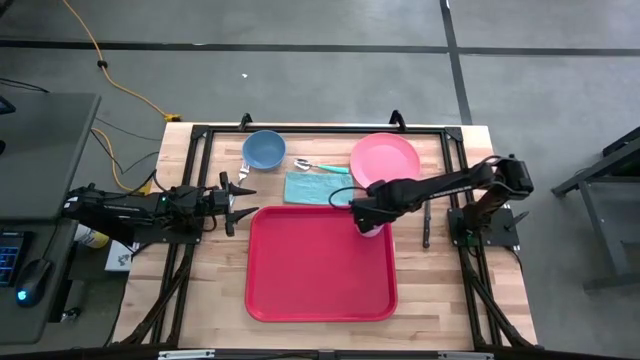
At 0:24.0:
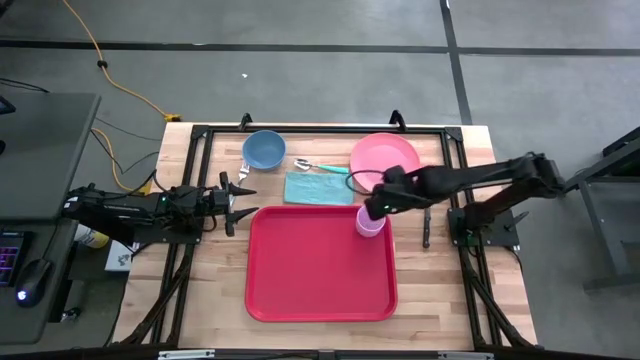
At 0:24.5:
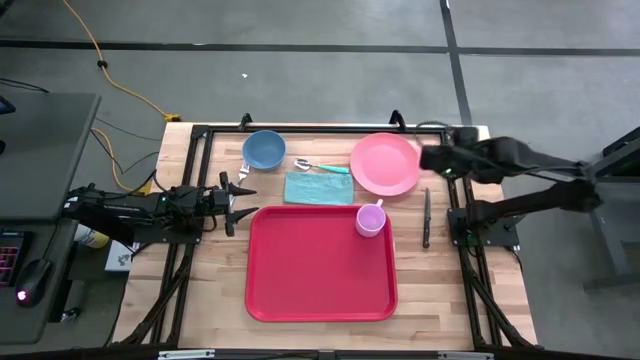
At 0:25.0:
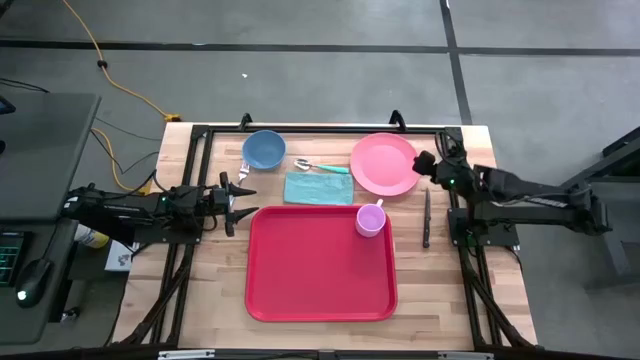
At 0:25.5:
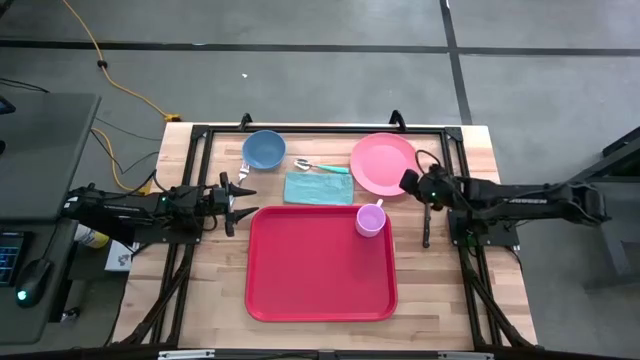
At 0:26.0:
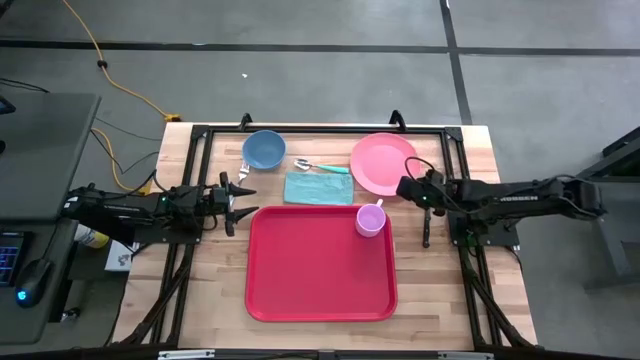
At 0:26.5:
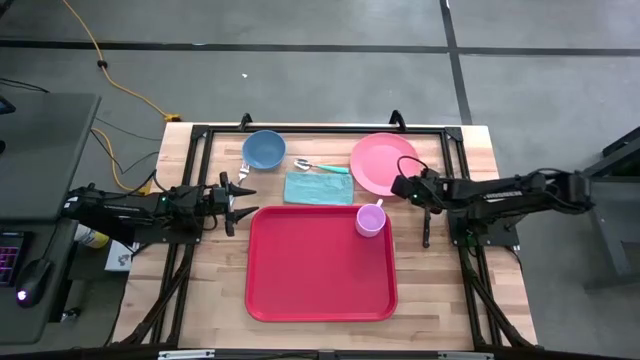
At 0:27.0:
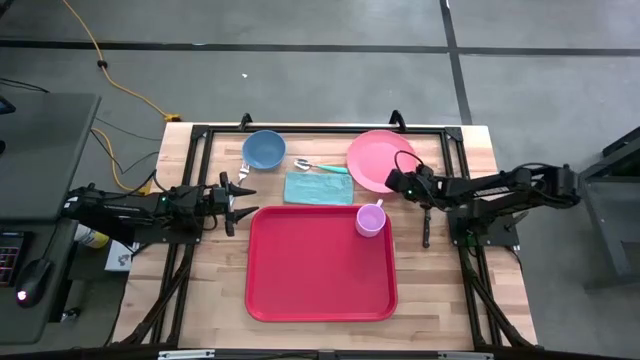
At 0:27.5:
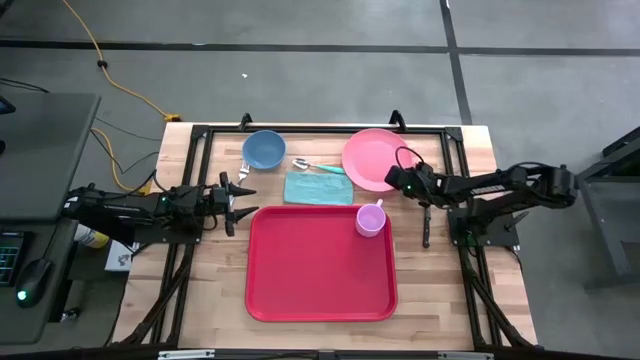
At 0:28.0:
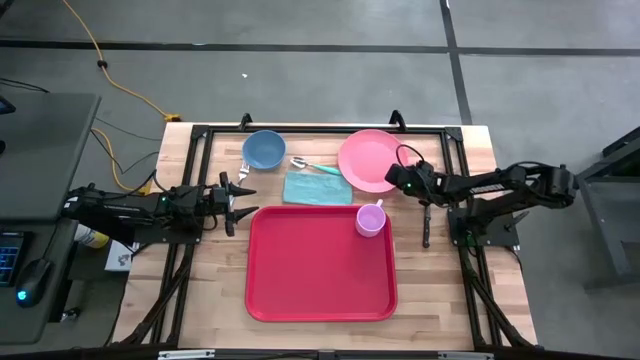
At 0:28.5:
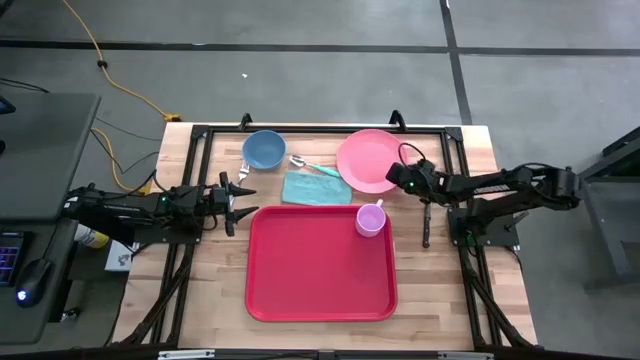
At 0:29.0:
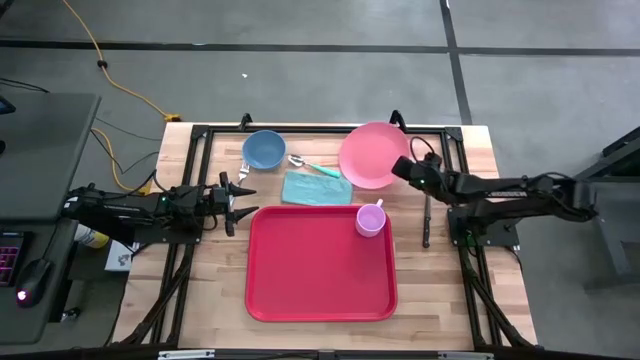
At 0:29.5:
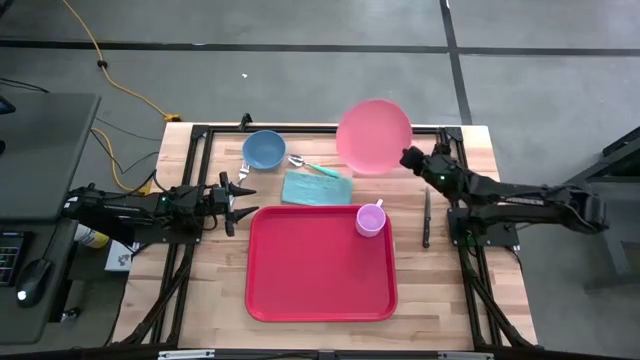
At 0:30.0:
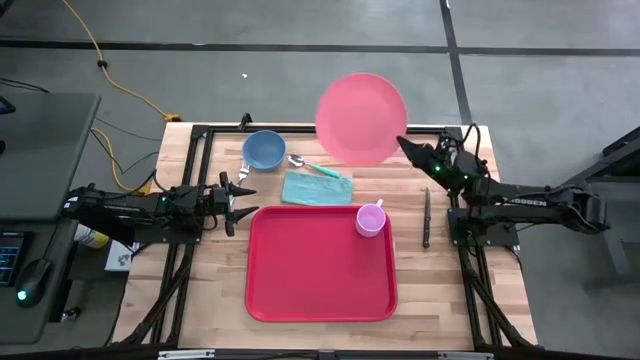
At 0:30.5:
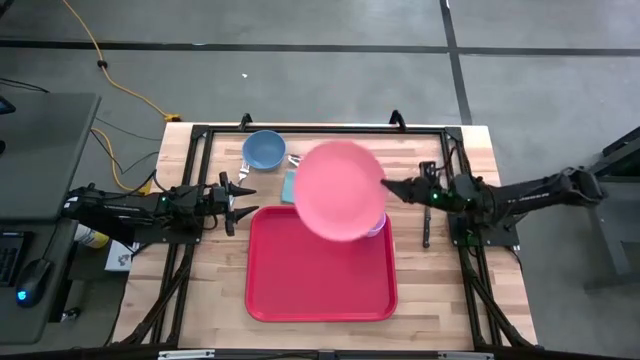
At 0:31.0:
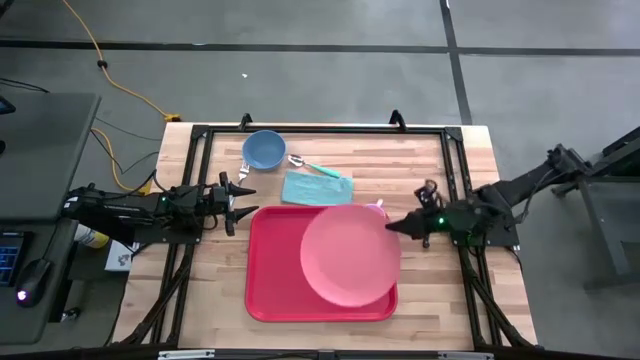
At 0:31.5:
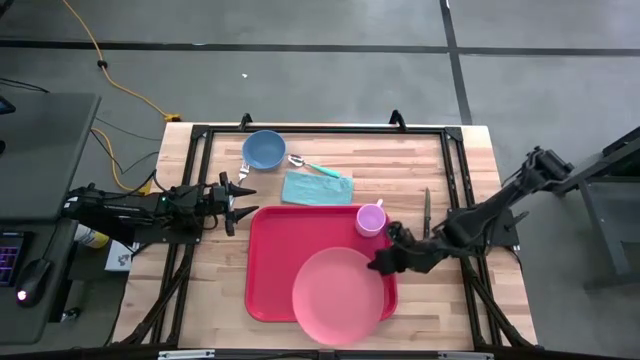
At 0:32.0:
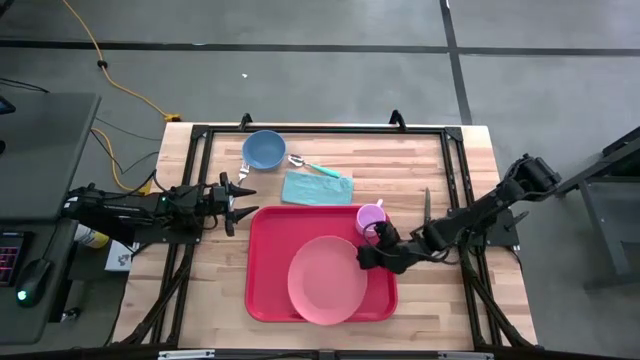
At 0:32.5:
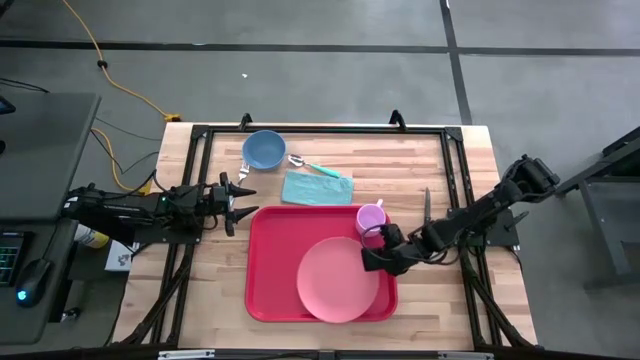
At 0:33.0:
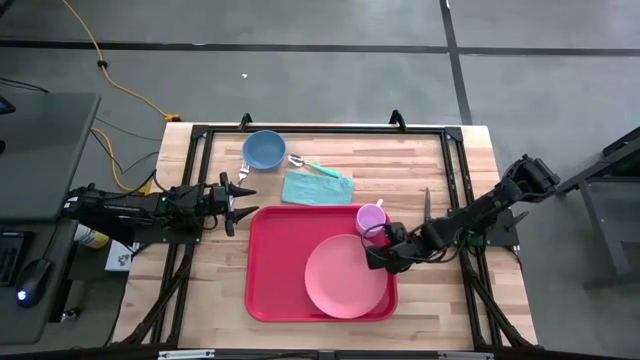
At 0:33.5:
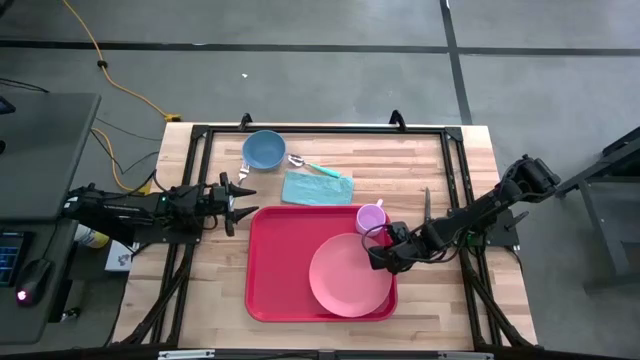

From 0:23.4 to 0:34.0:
Task: Set up tray
Put the pink plate on the red serving tray at the bottom of the pink mug

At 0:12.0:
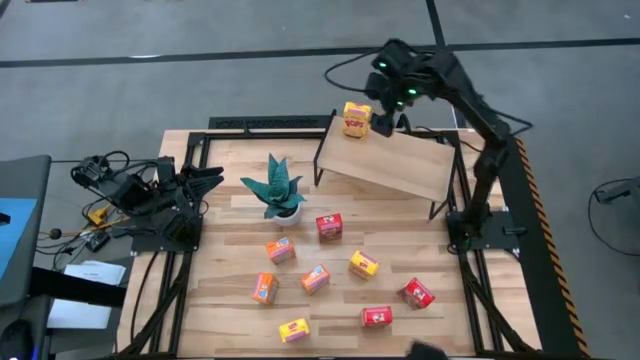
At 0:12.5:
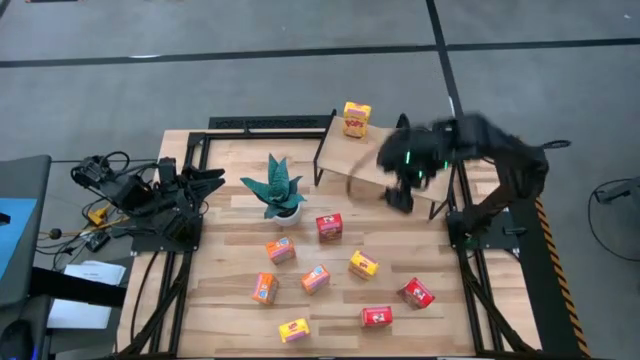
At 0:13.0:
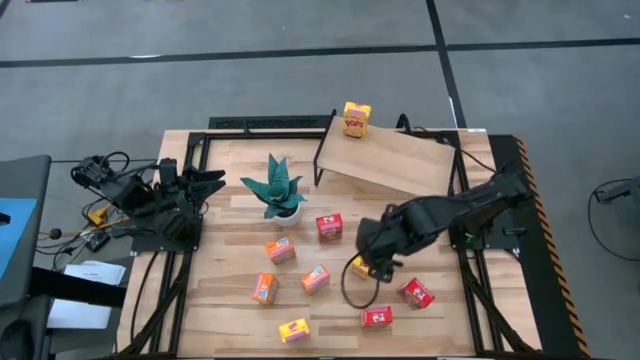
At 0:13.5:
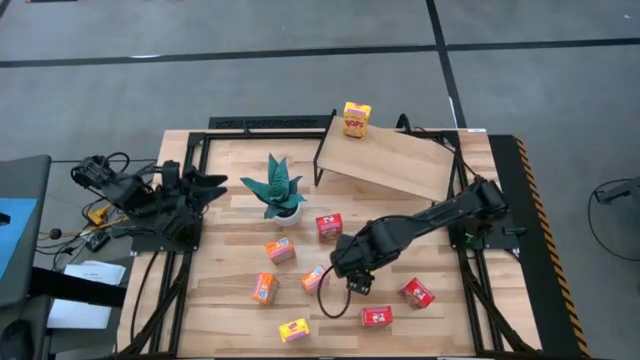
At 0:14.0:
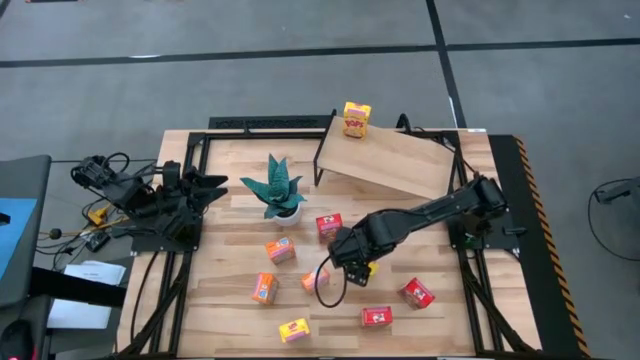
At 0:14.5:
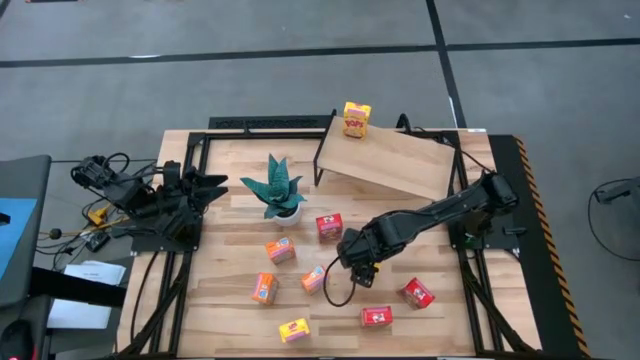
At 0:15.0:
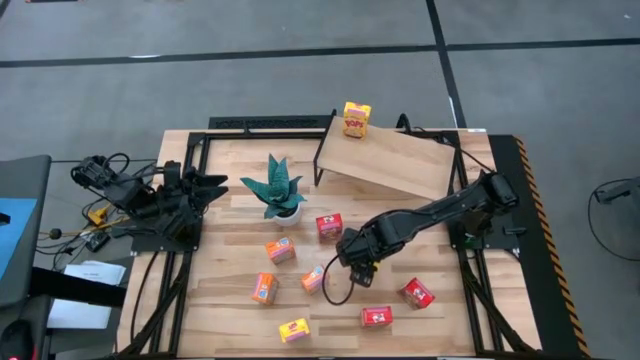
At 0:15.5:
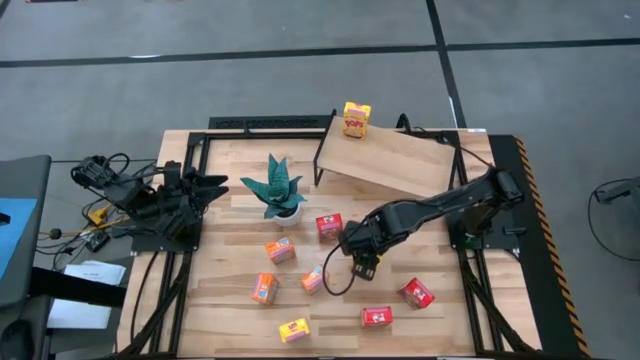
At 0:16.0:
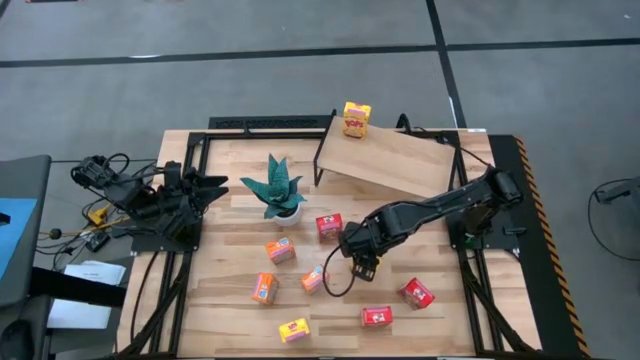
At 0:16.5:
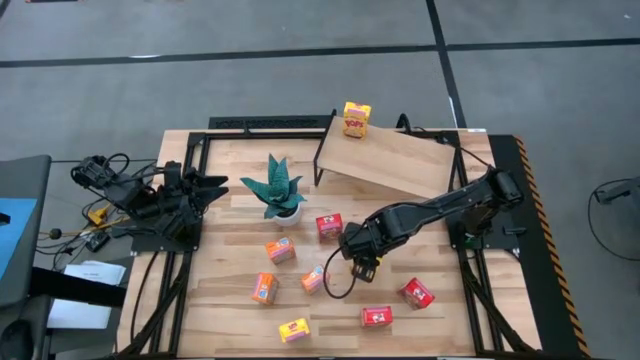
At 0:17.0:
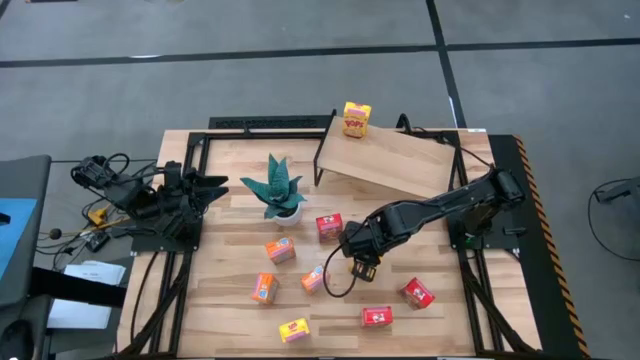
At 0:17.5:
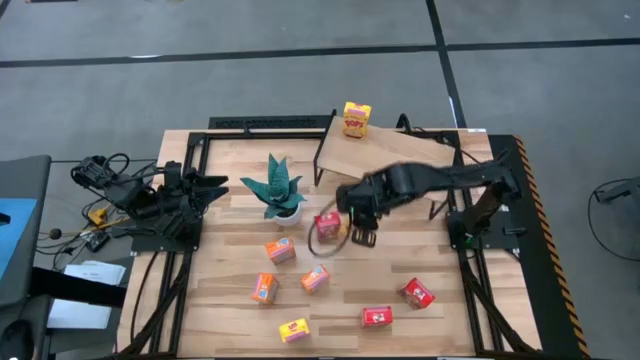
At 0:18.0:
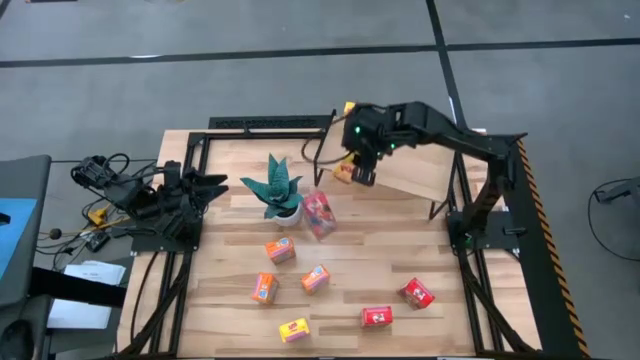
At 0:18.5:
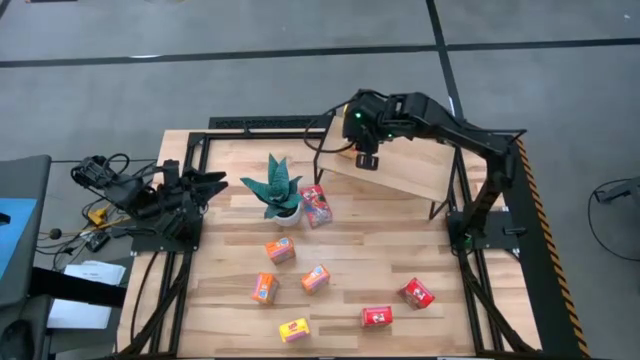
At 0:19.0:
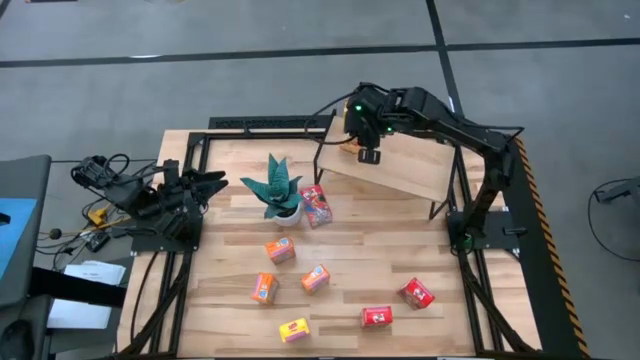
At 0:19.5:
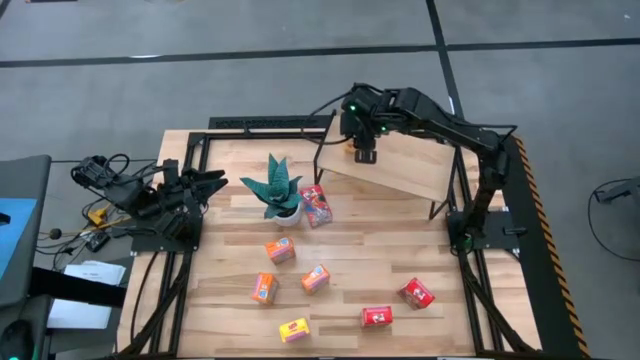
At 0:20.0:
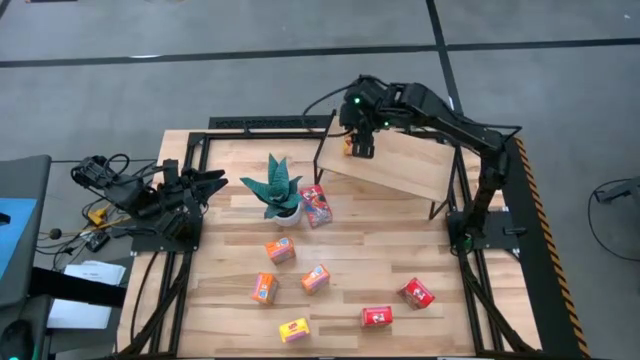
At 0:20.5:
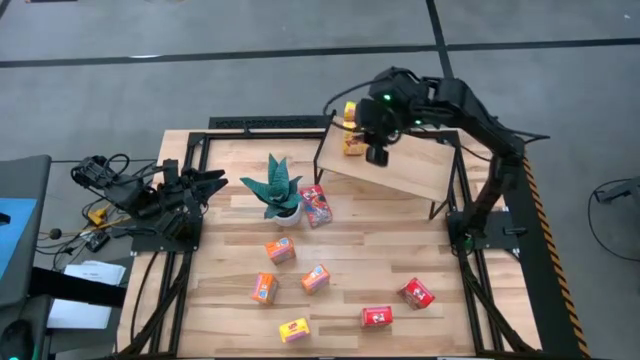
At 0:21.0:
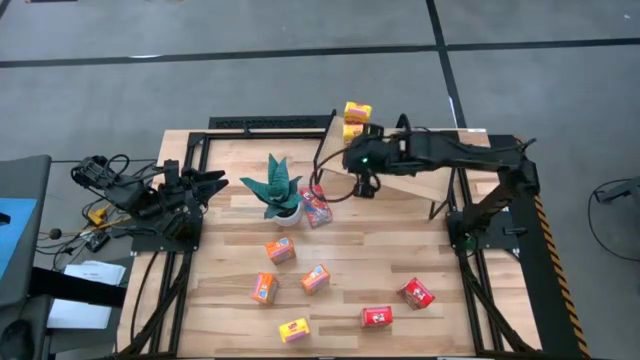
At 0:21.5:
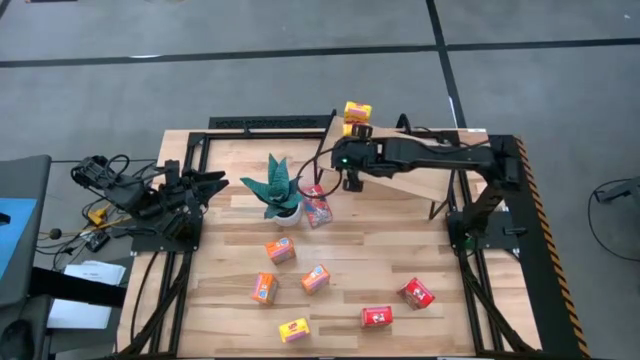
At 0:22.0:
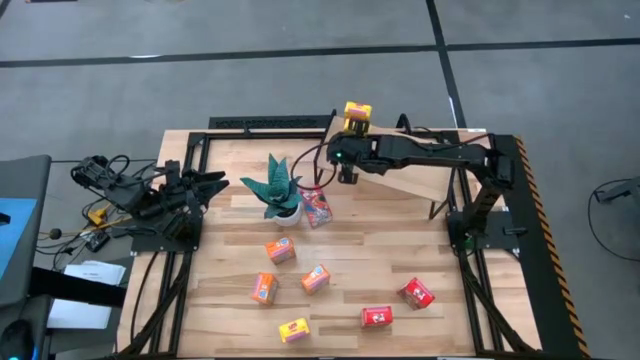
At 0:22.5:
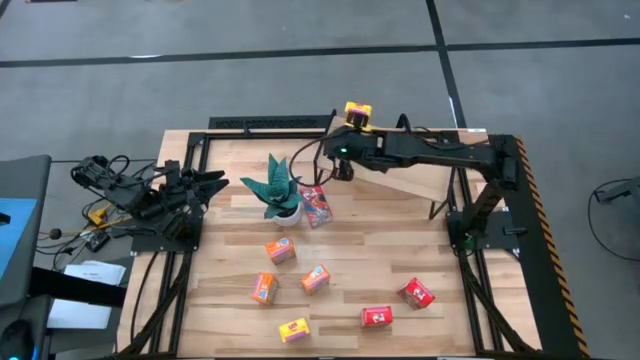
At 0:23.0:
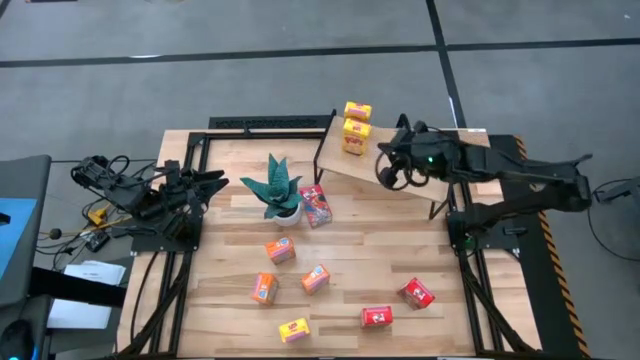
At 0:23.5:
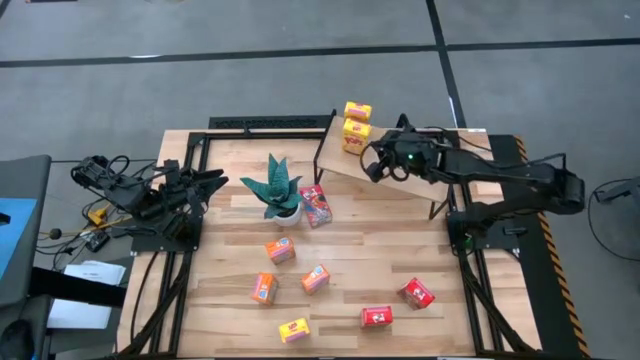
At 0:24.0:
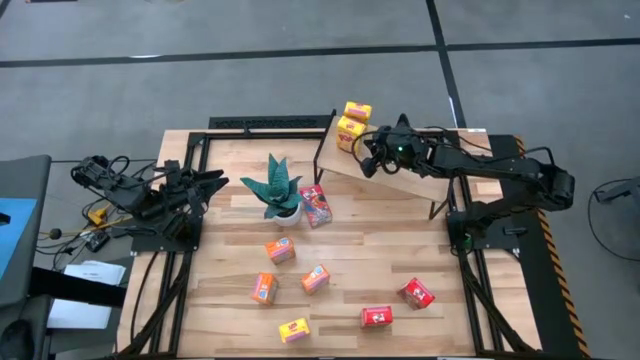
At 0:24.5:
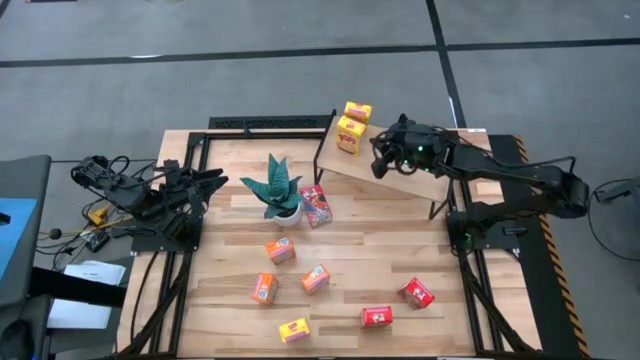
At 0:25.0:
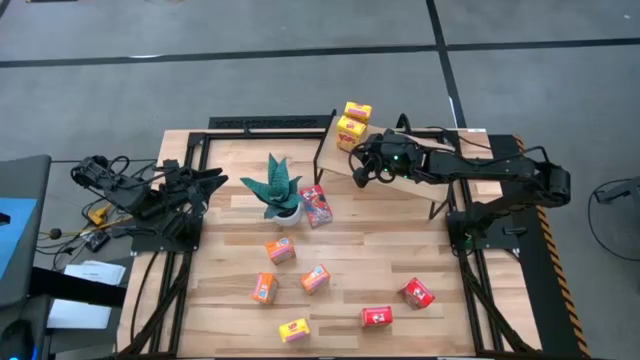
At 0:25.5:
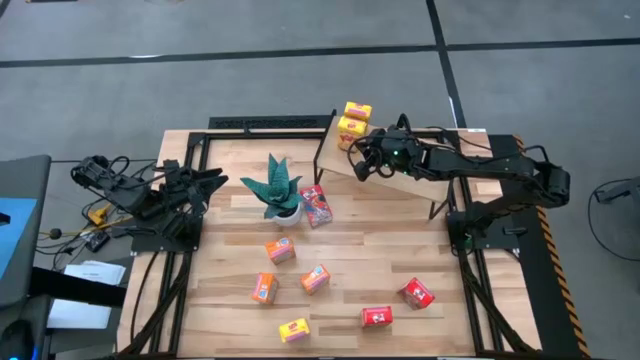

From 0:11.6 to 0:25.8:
Task: Stack cereal on shelf
Put the top yellow cereal box on the shelf aligned with the other yellow cereal box
